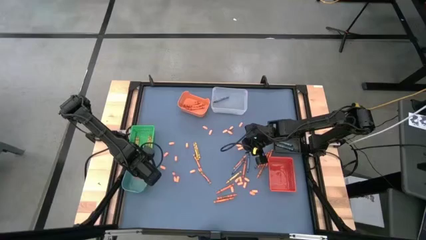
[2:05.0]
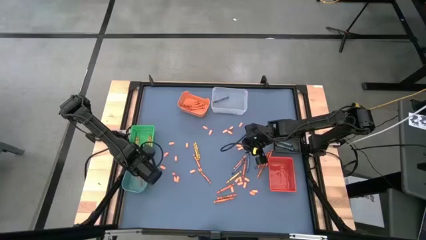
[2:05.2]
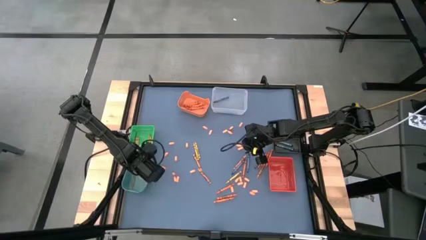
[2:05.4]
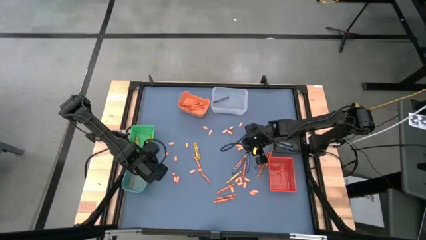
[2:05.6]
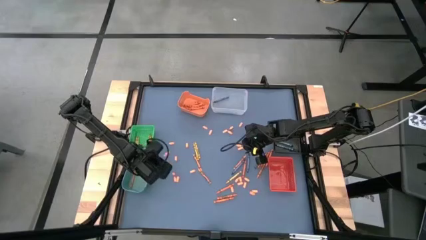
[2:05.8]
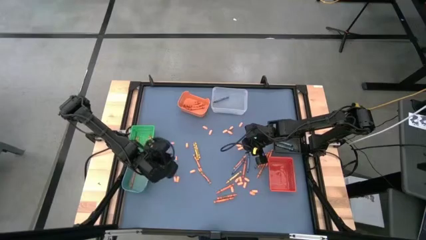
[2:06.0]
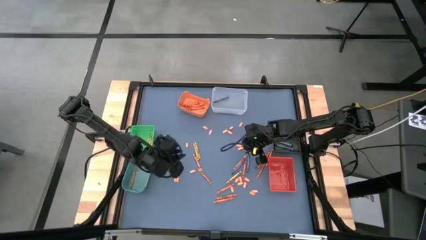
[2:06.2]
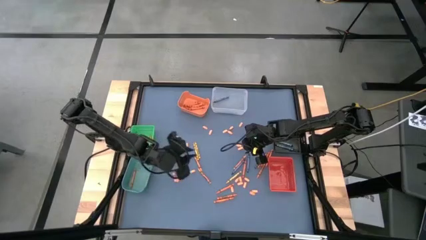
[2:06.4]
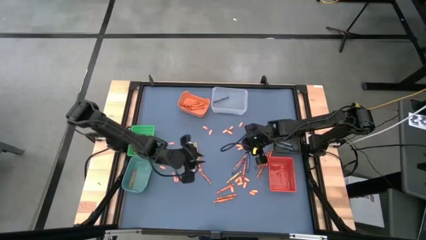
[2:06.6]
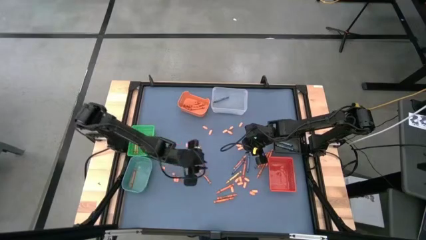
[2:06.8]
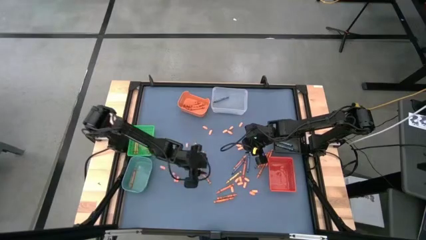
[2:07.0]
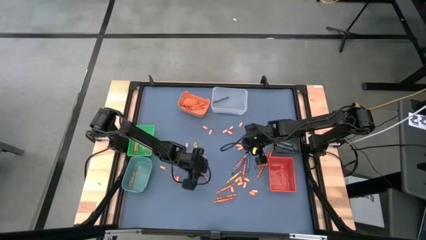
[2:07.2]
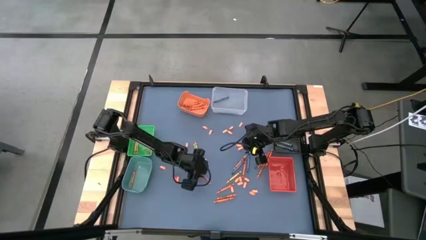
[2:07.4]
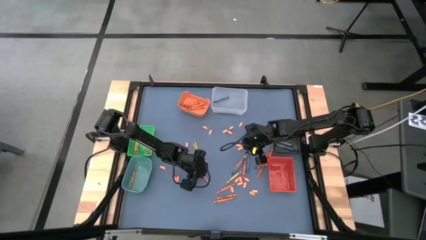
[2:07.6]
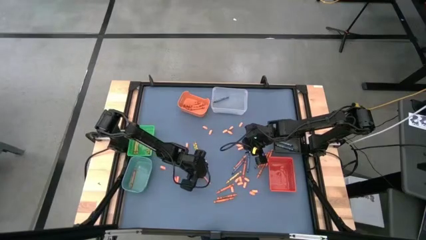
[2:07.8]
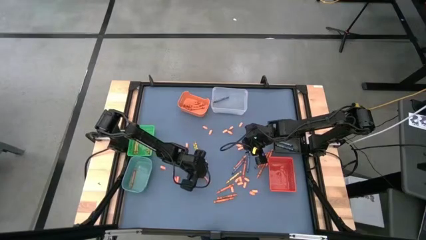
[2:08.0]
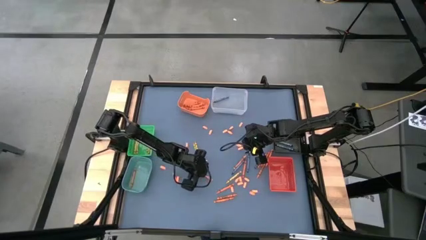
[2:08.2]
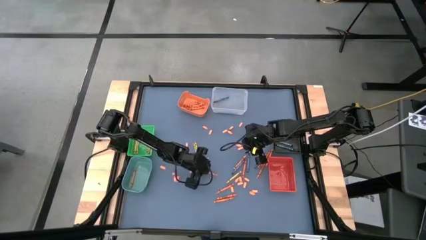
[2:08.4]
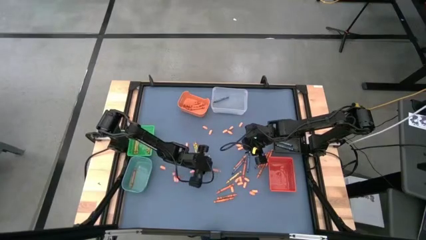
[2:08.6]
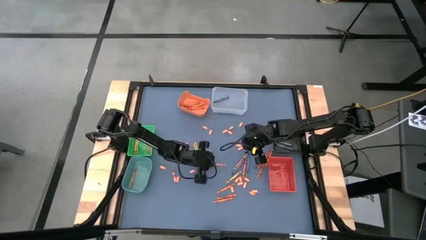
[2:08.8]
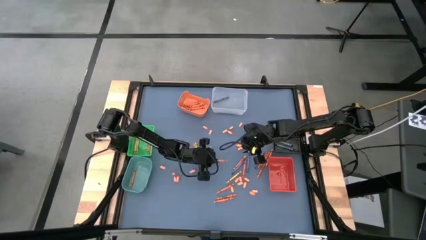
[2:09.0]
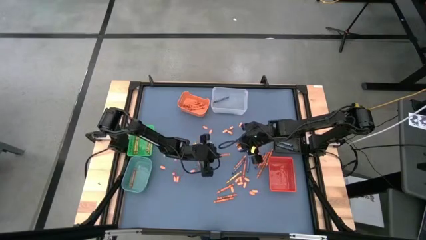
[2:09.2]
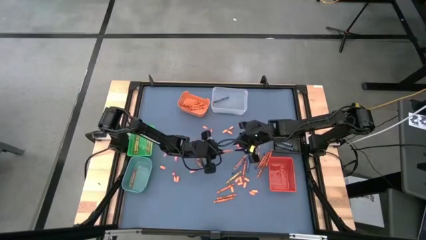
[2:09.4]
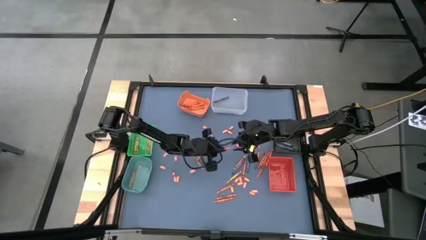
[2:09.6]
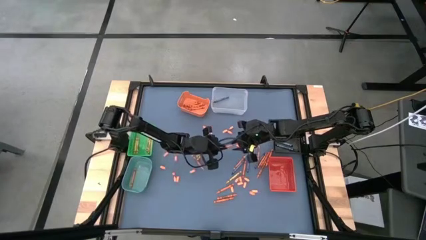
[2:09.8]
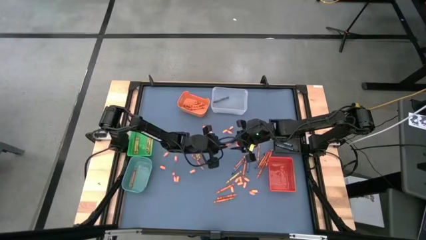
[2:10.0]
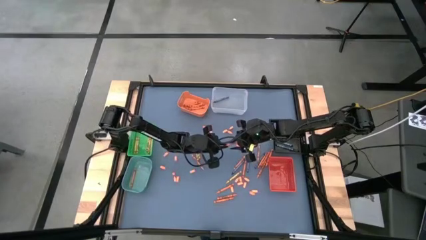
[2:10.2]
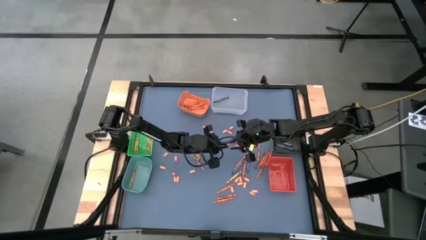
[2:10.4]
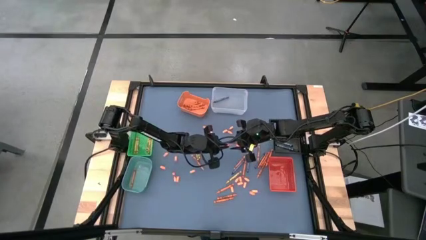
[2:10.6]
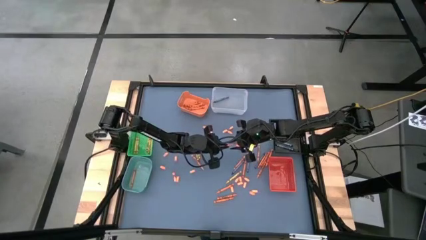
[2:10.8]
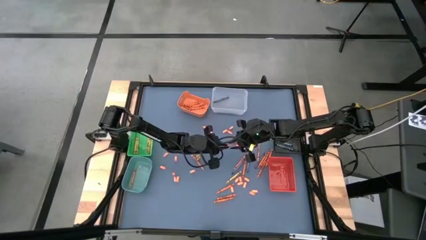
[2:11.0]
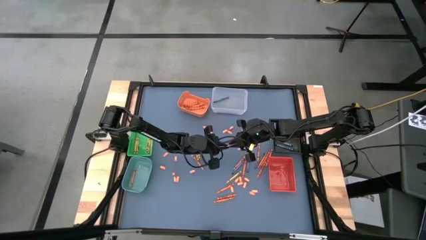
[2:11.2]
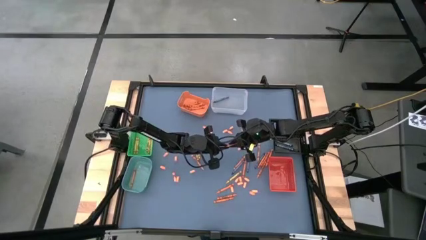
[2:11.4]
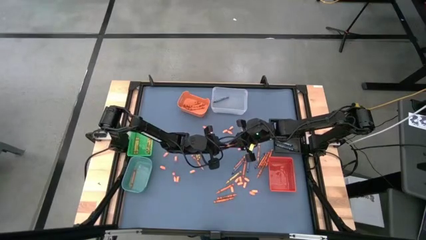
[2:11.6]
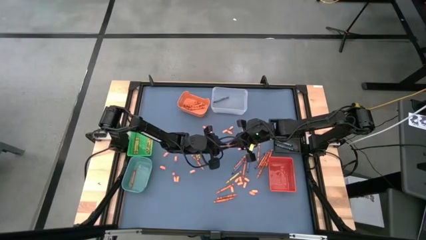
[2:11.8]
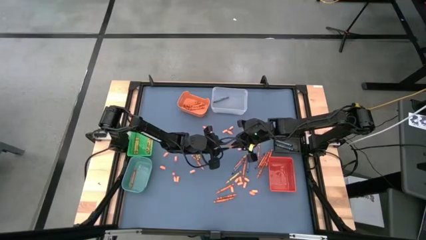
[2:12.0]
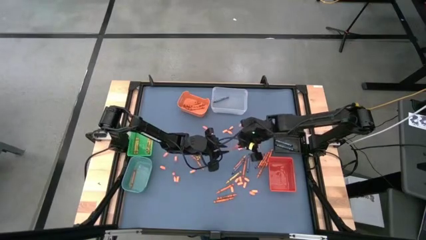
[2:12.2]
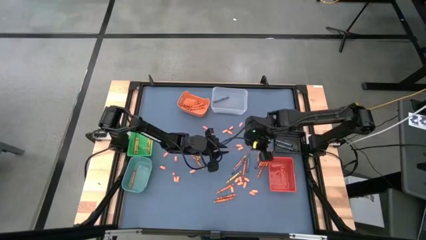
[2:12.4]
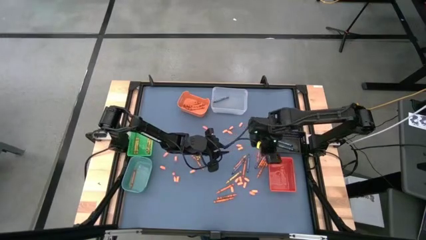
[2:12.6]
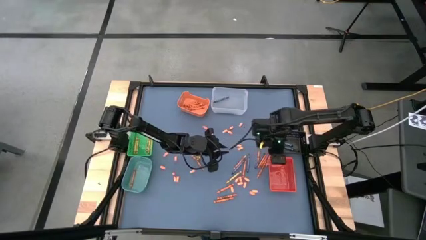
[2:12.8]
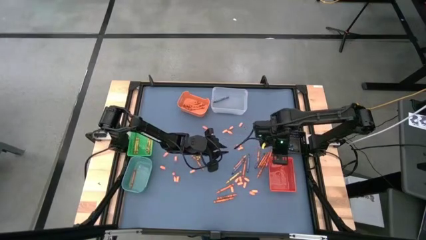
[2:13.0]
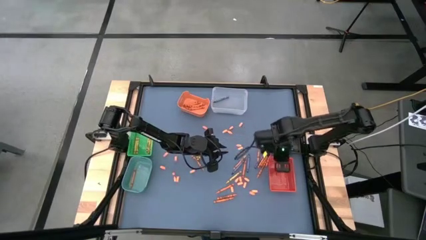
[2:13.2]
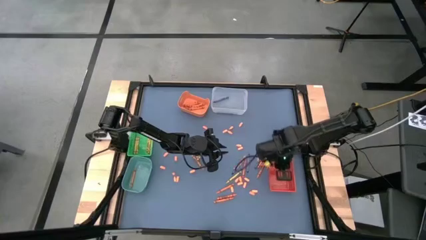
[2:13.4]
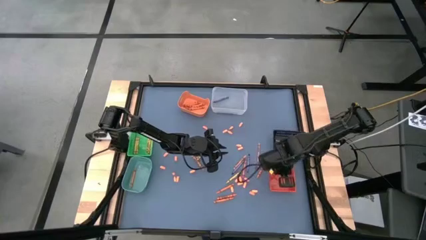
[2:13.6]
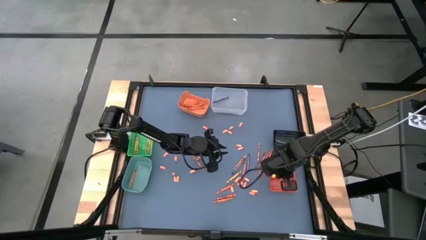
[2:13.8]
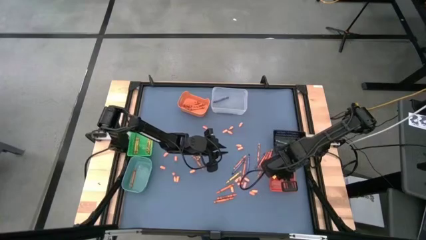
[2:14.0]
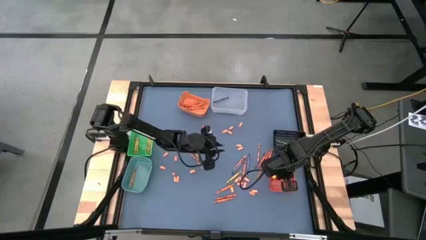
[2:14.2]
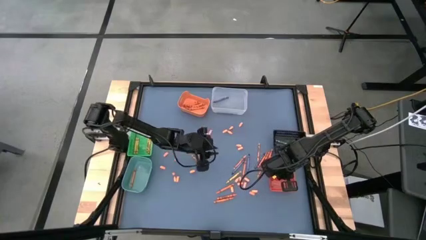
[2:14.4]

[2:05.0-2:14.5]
Task: Sort crayons
Put the light orange crayon into the red bin

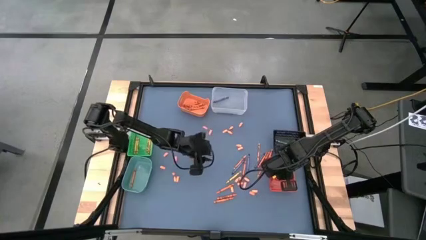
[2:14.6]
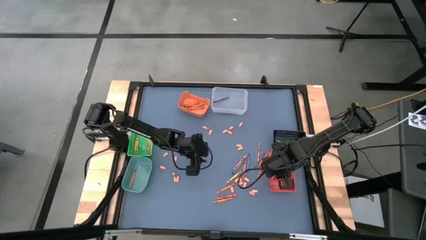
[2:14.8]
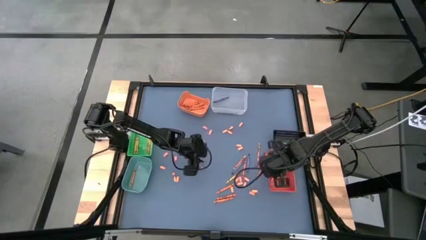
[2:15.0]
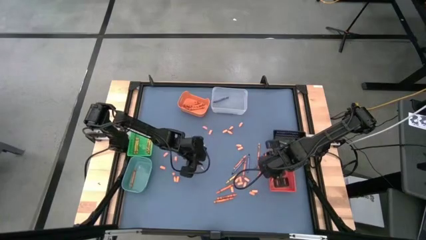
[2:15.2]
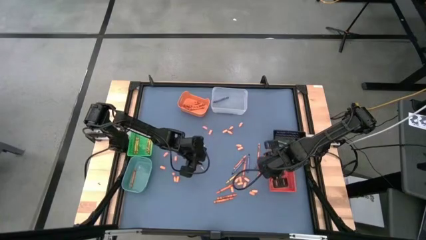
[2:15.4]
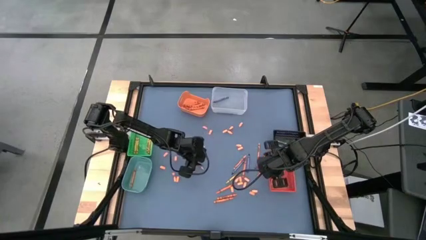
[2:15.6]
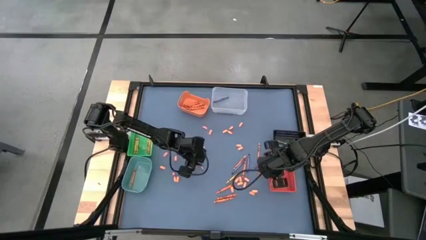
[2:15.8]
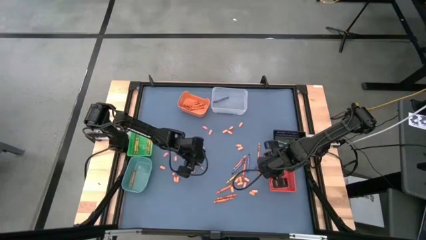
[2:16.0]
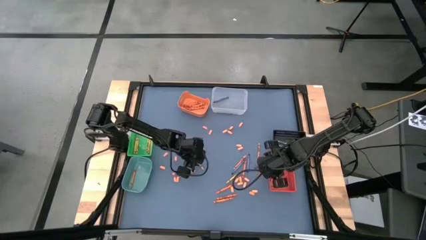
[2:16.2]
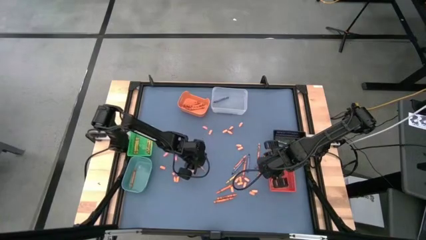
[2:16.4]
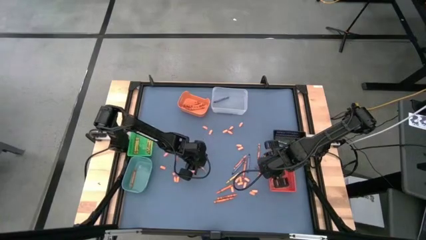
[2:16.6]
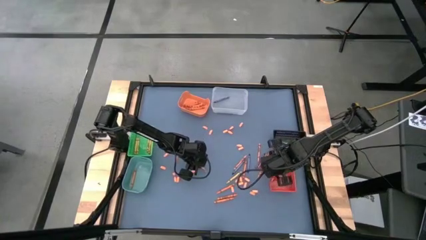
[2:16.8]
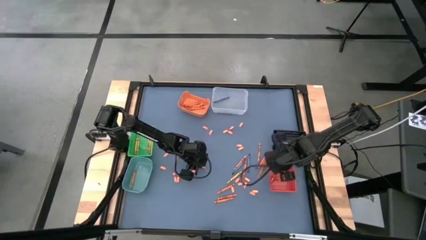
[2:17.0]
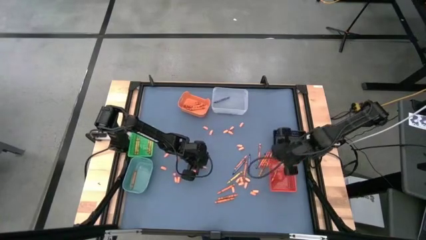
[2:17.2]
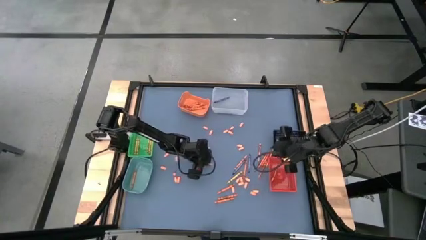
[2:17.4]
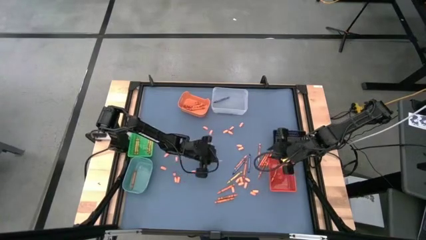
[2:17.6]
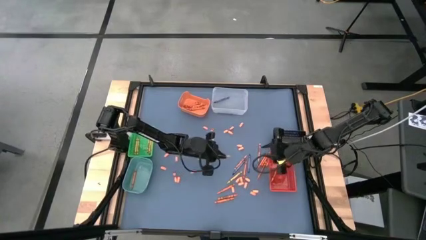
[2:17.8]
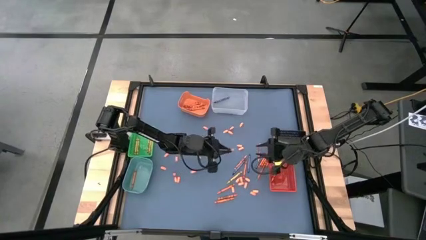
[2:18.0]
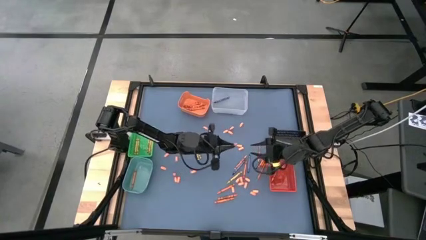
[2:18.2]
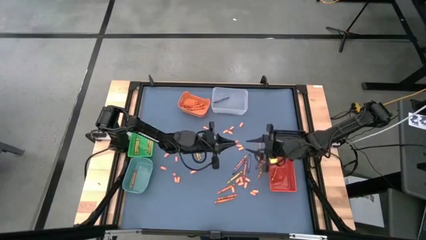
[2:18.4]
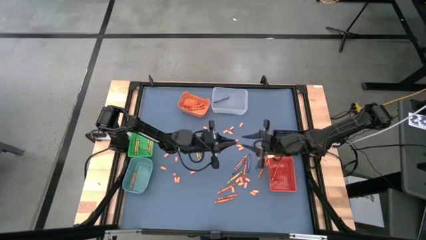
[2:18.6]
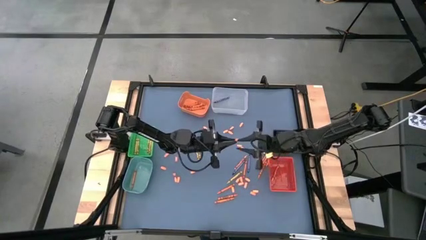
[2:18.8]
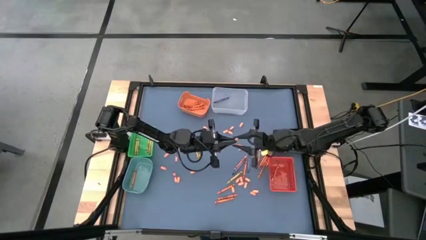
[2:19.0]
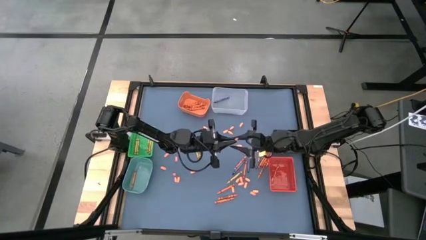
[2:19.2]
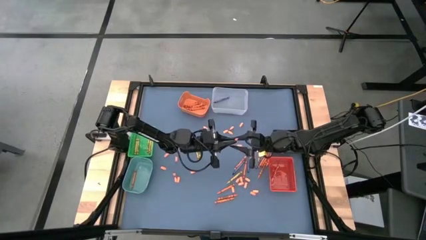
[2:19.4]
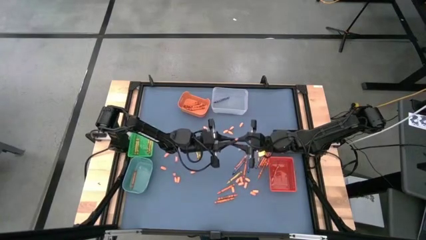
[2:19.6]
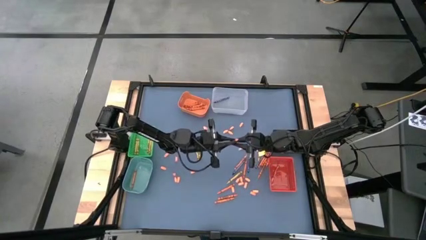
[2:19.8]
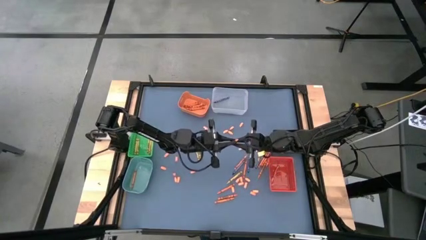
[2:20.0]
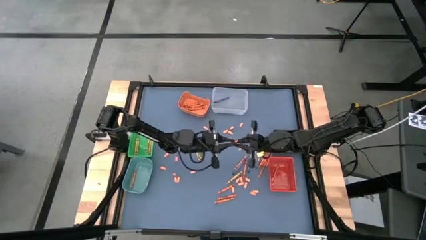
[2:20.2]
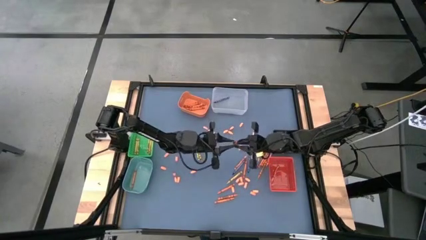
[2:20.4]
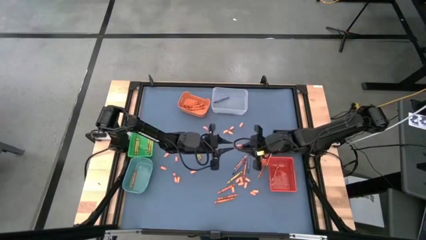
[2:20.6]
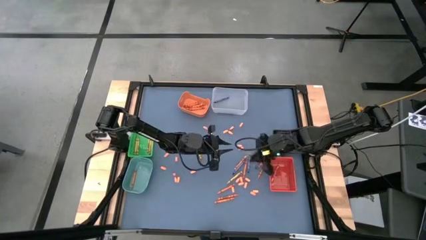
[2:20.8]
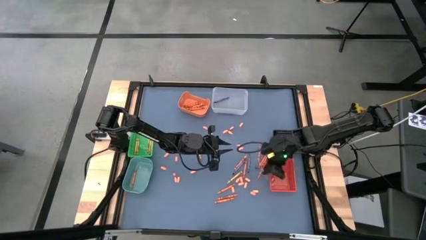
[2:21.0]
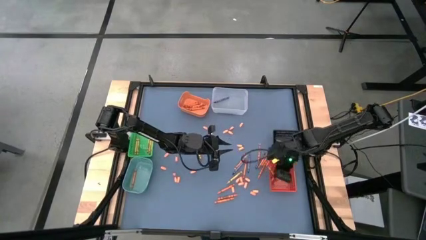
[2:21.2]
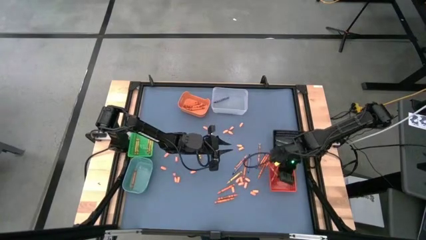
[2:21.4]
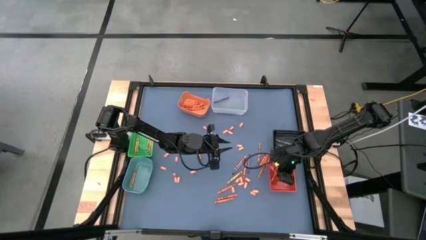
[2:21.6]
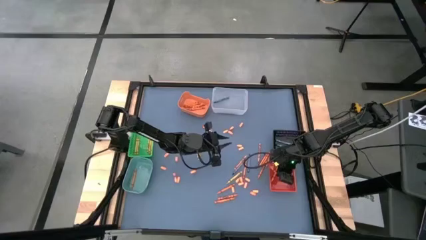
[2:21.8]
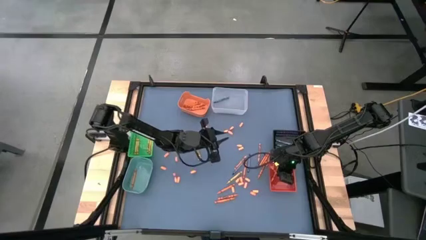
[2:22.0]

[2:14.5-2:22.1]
Put the light orange crayon into the red bin
